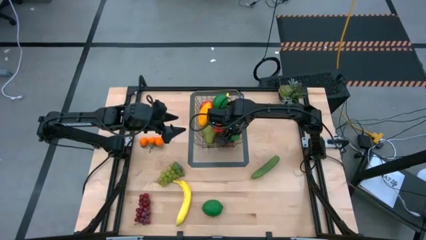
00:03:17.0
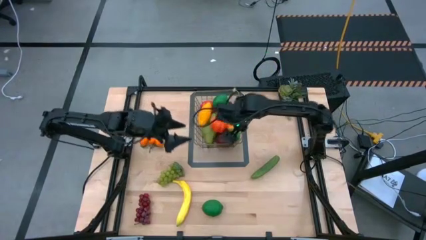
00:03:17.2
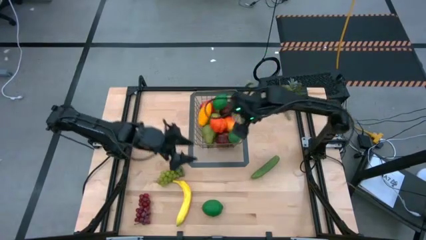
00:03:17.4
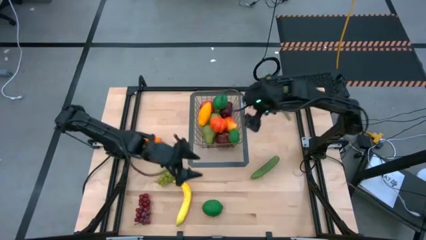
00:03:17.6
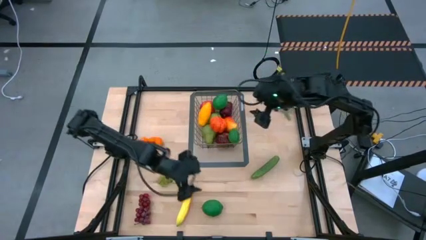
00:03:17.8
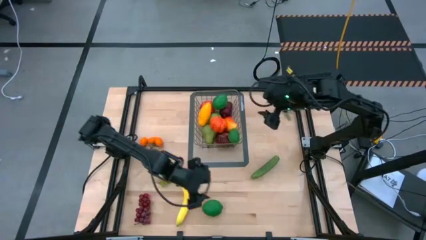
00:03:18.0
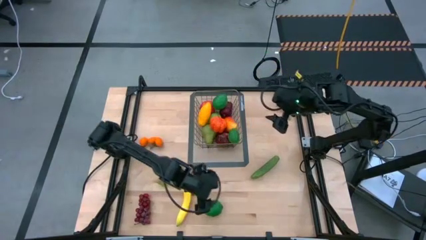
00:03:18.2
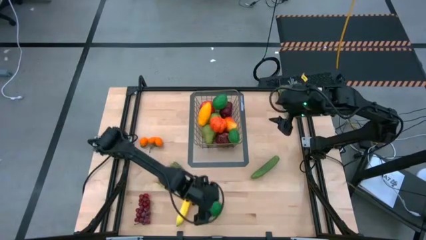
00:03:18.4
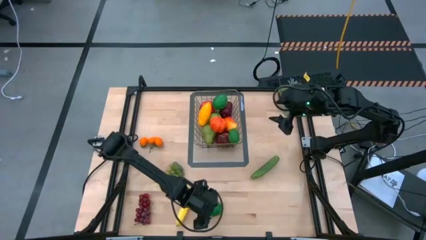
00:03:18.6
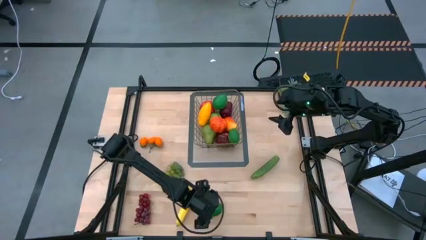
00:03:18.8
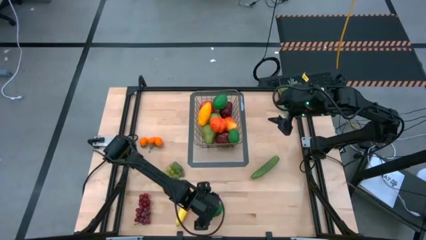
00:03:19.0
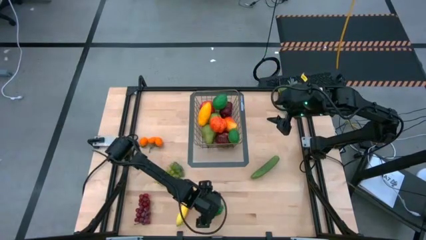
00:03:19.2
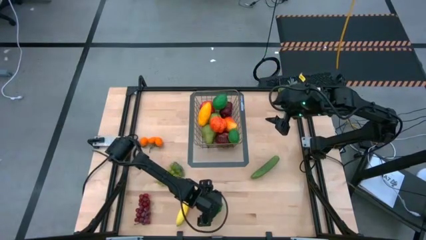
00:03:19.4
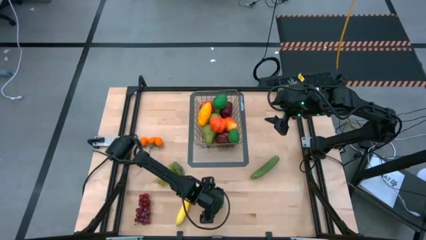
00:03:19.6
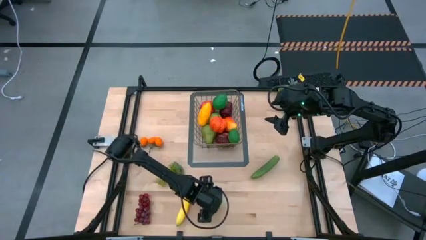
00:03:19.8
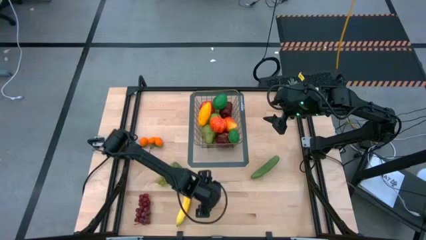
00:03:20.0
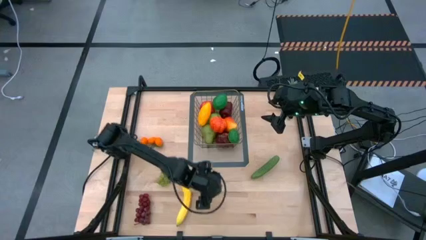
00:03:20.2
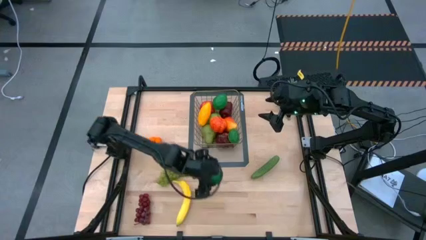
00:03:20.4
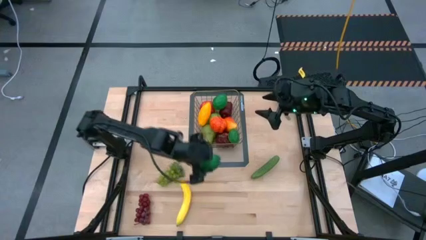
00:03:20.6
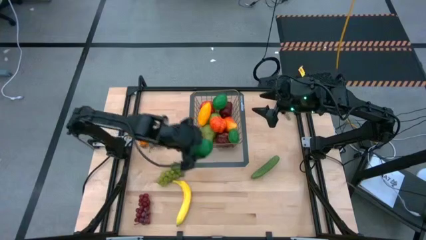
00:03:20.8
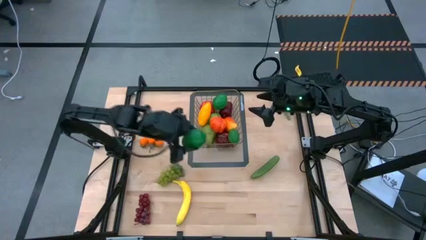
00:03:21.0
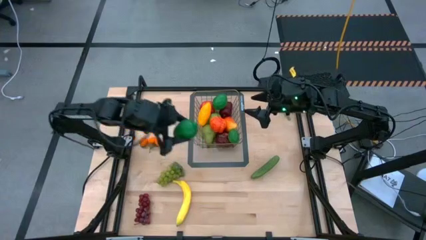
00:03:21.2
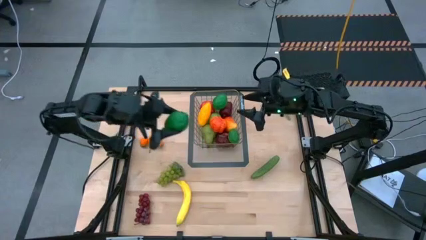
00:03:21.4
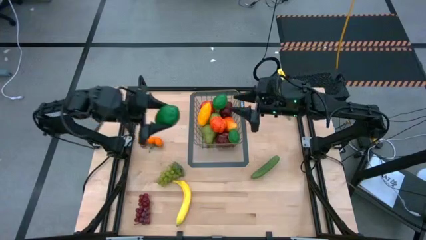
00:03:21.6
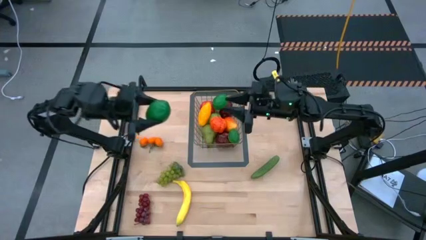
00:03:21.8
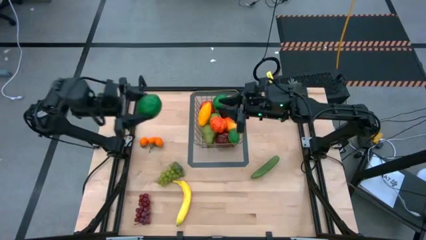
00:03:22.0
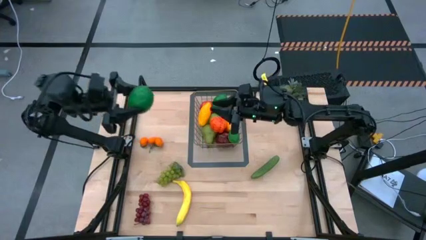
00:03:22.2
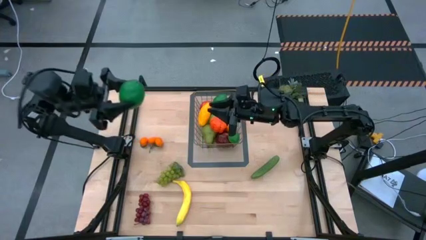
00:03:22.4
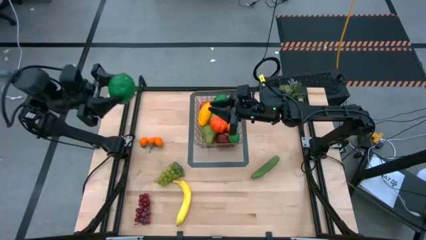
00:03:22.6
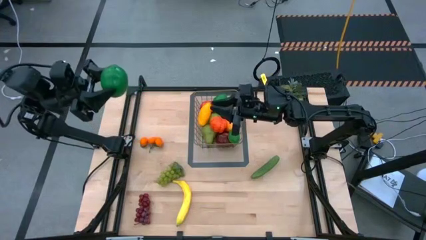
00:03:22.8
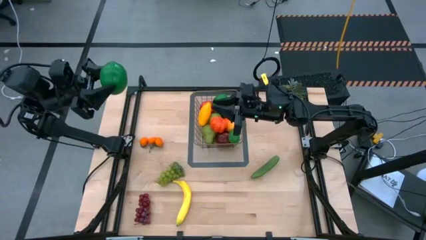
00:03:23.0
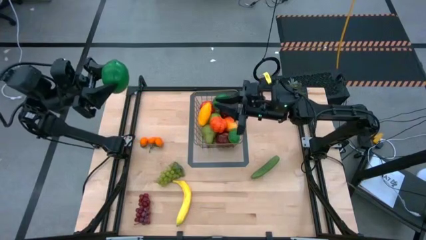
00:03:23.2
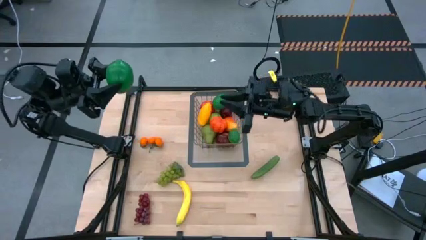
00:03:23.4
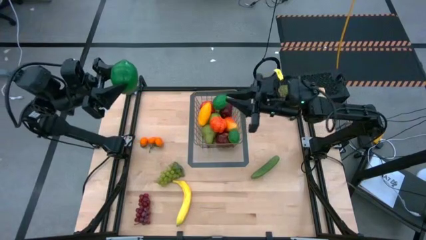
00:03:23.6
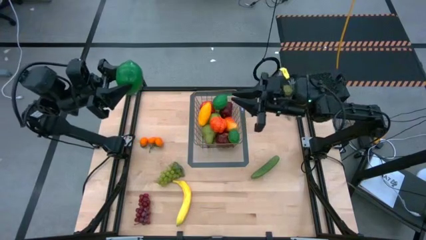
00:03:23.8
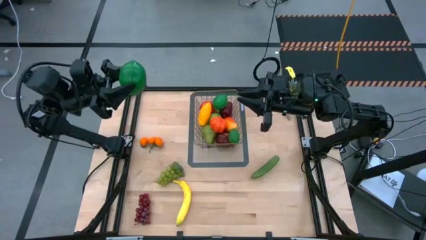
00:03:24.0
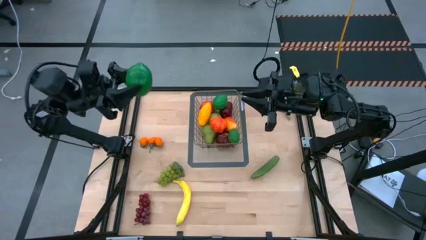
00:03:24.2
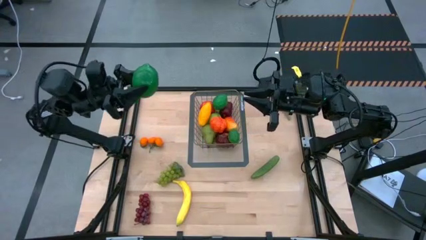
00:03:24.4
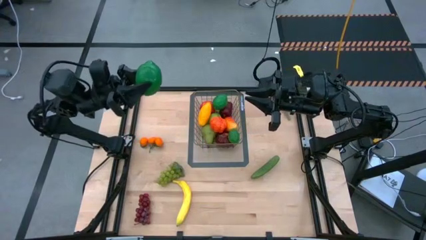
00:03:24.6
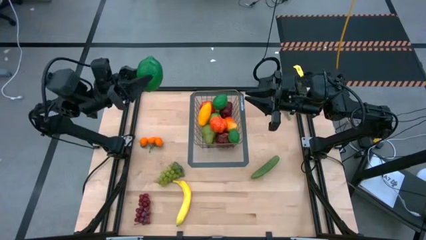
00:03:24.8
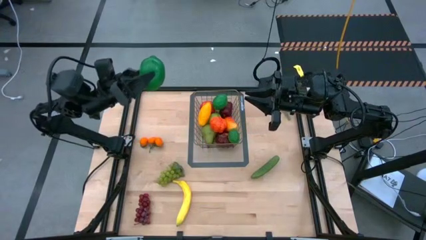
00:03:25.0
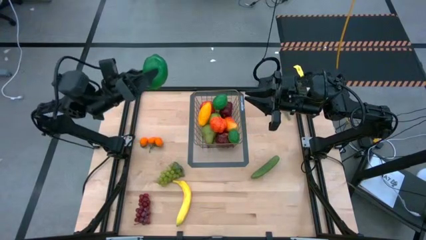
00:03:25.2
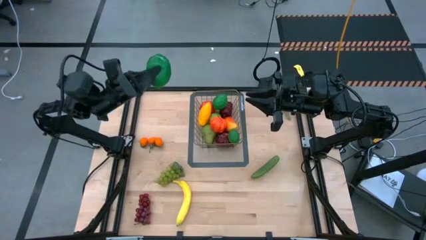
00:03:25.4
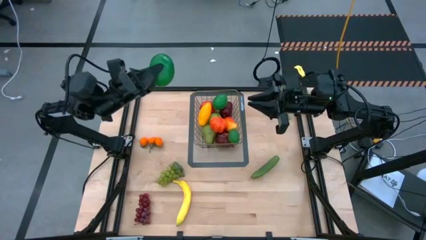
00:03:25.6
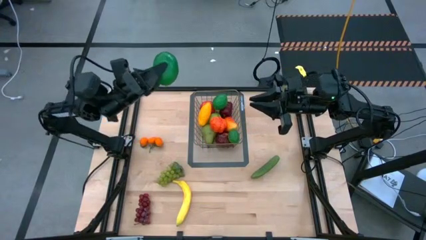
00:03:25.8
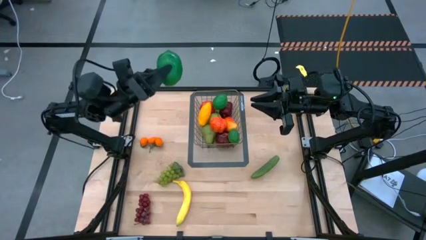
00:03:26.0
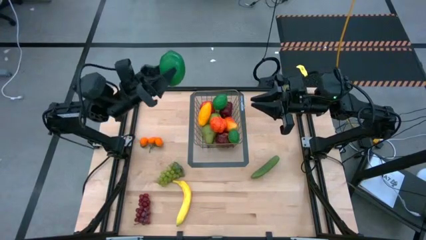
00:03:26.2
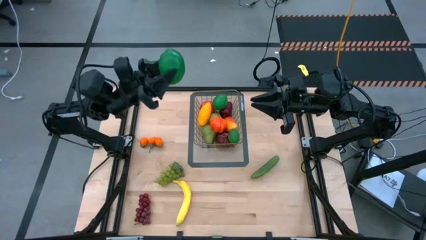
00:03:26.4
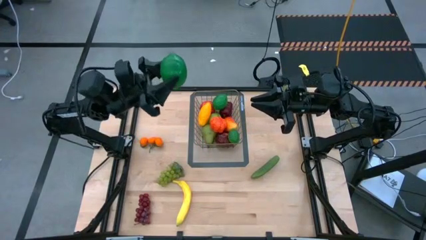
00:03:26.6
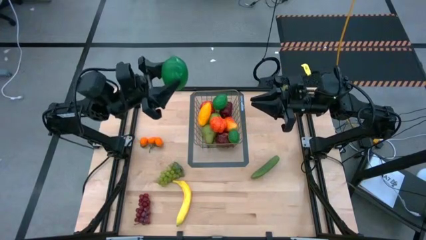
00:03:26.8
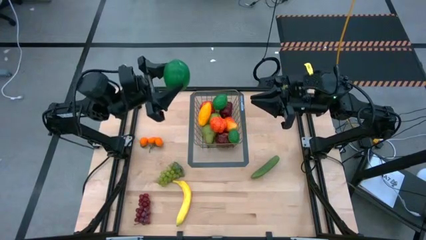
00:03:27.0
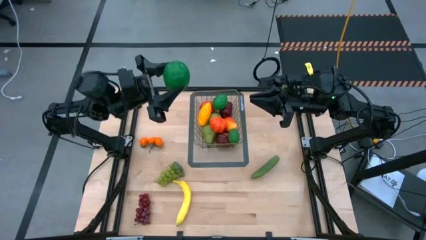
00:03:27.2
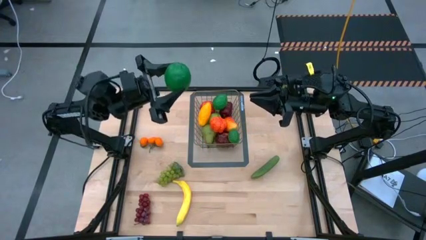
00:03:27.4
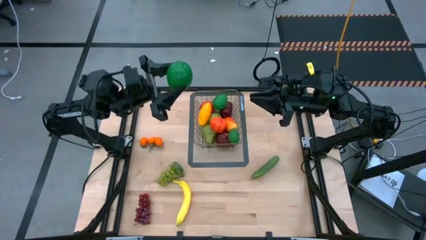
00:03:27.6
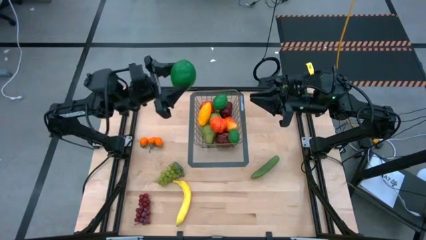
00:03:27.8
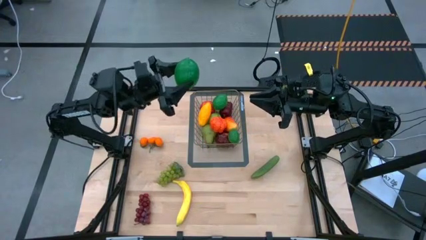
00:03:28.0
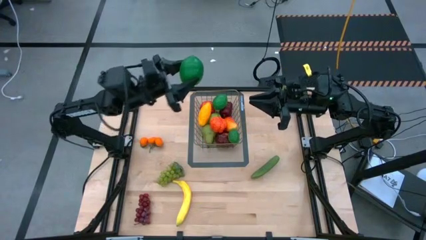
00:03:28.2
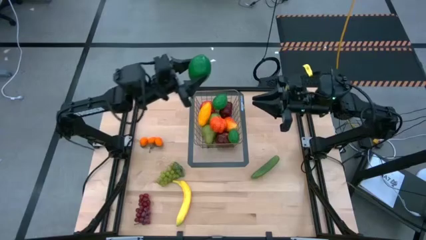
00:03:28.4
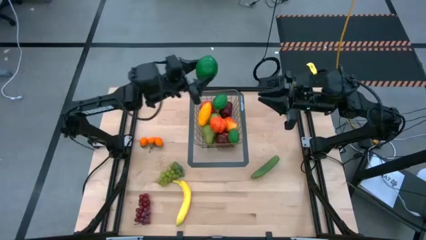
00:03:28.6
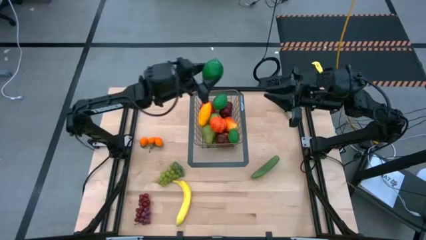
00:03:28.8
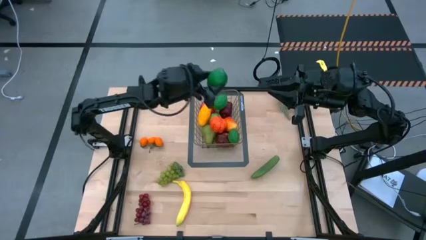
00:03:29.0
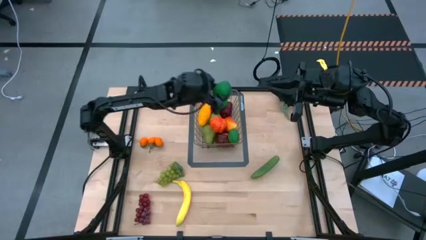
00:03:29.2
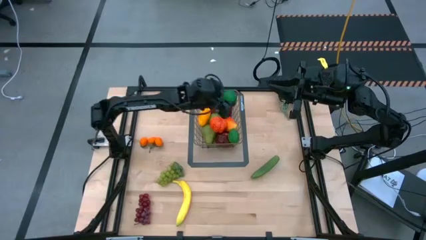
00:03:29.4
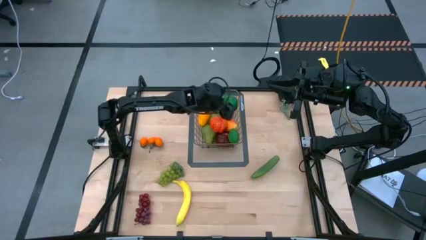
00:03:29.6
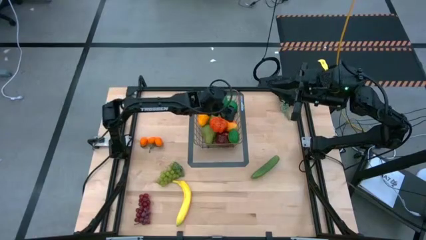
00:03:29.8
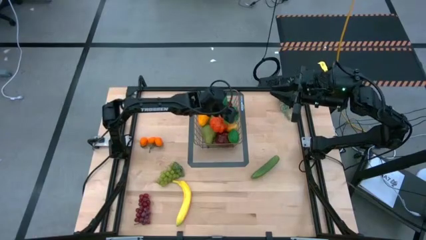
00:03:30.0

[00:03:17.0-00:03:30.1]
Task: Build produce basket
Put the green lime into the gold wire basket

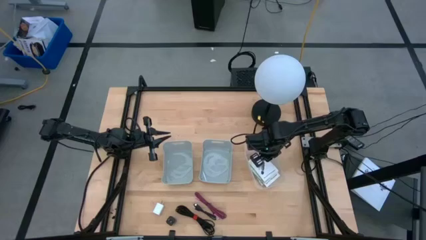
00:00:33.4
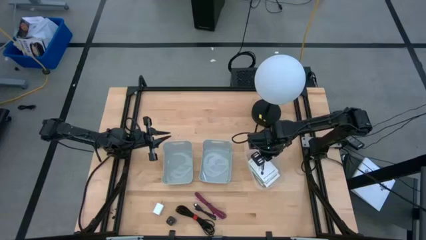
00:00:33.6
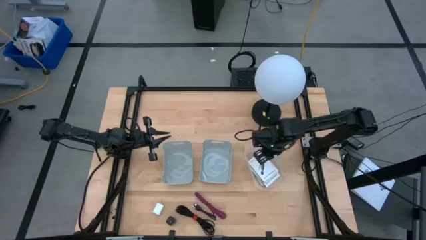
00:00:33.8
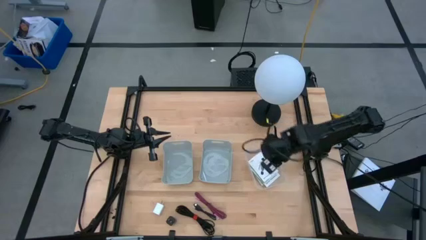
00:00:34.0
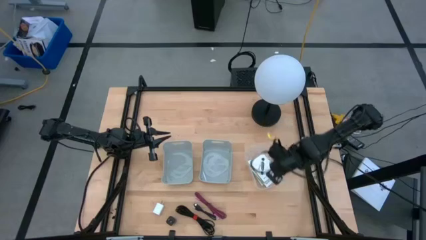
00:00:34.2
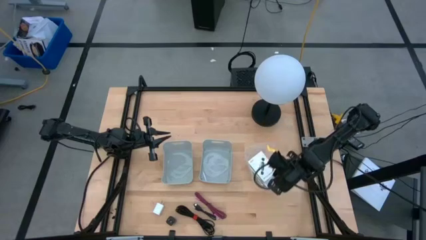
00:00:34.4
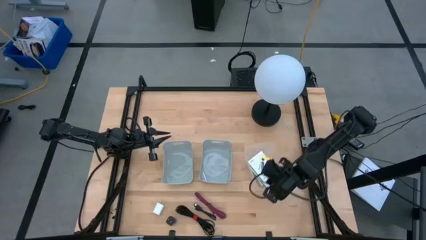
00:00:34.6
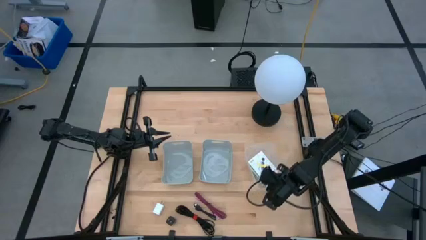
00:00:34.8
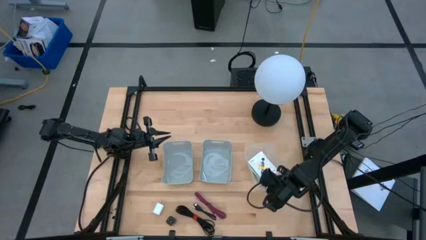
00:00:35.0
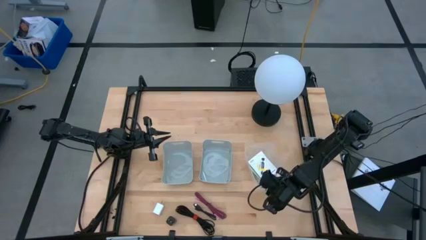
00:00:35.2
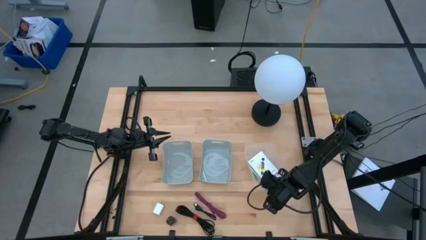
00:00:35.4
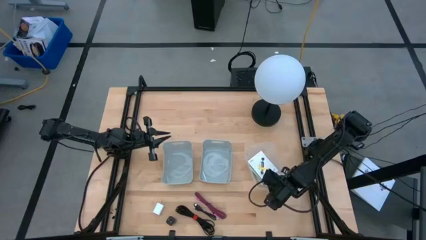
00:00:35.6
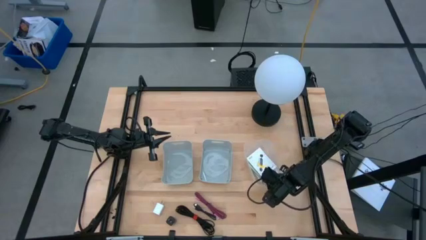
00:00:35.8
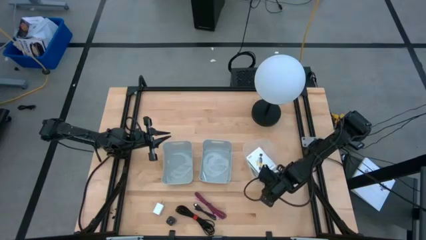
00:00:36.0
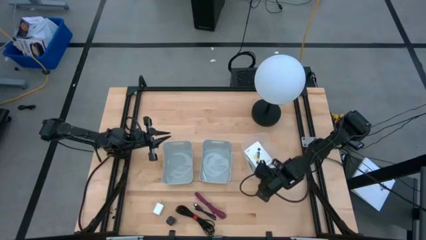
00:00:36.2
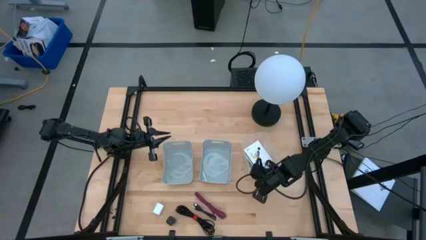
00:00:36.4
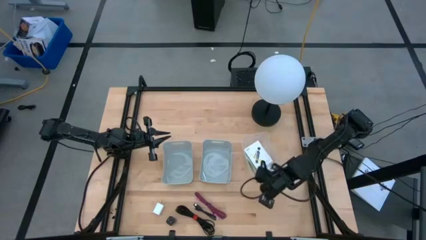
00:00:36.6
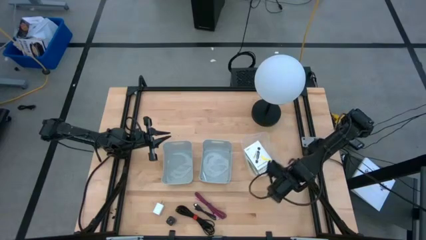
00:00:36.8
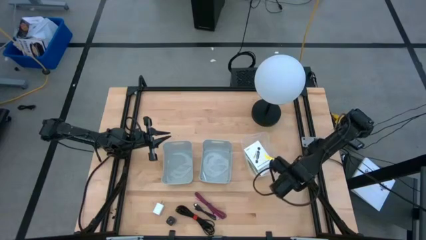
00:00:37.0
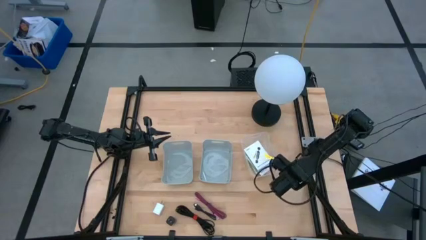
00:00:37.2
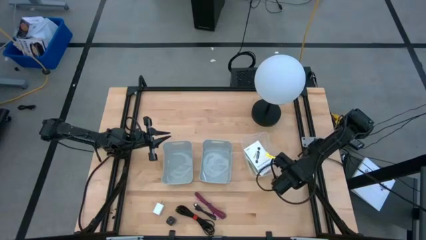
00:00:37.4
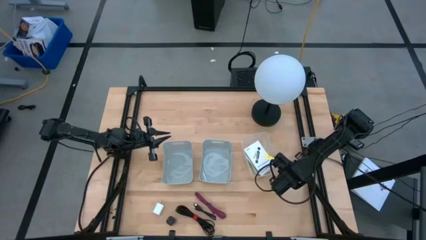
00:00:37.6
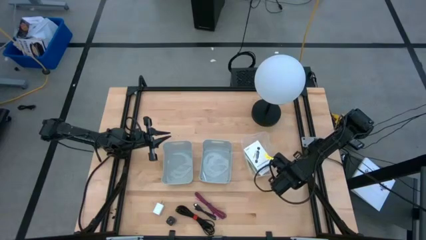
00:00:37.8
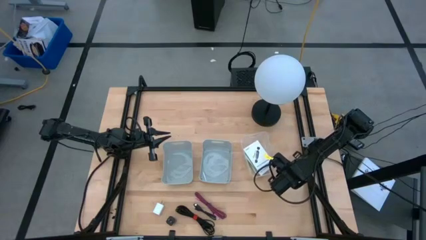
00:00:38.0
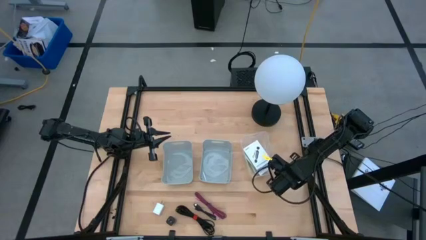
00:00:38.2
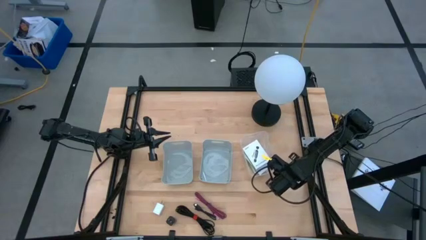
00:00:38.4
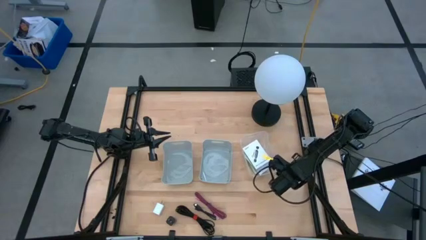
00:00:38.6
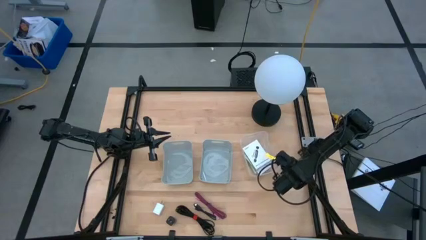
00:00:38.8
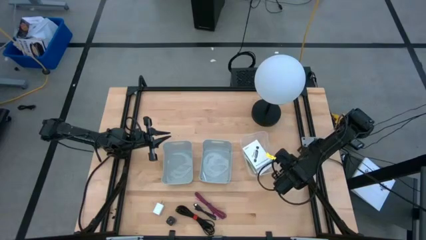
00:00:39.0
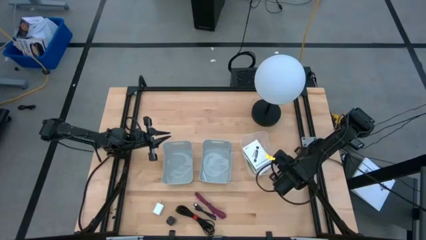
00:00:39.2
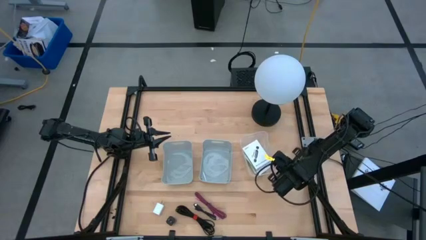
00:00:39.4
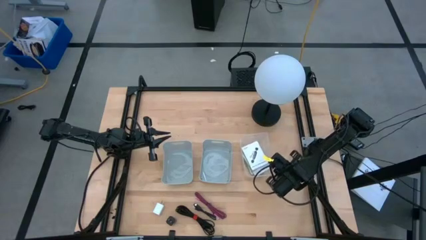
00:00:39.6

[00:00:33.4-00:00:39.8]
Task: Pick and place items into bin
Adjust the transparent bin
